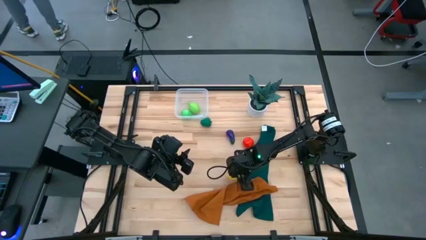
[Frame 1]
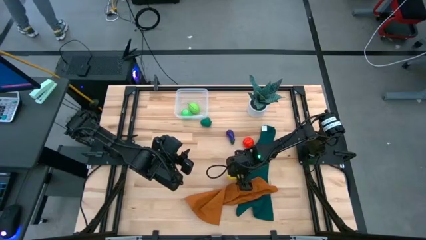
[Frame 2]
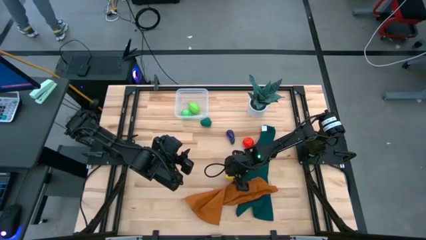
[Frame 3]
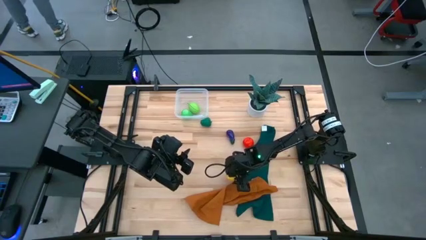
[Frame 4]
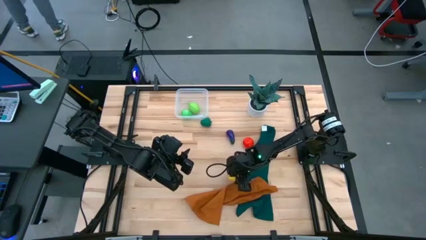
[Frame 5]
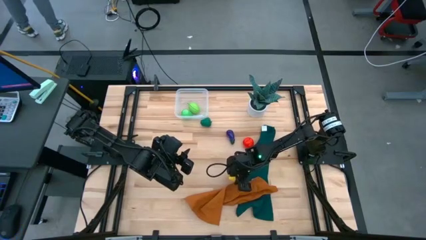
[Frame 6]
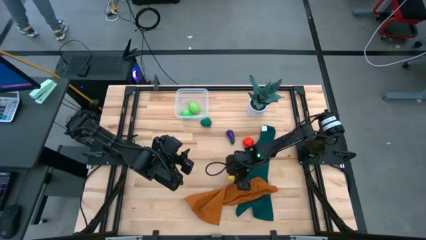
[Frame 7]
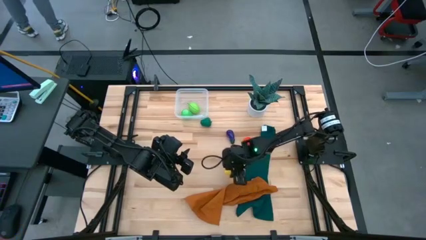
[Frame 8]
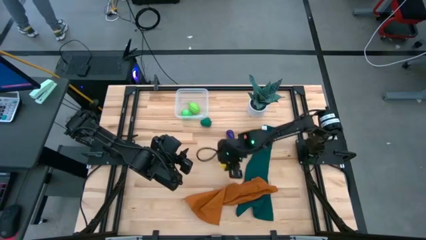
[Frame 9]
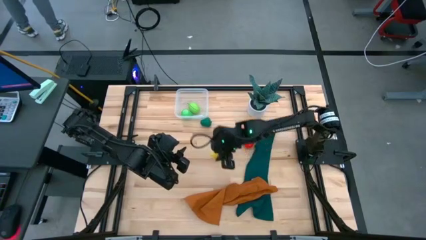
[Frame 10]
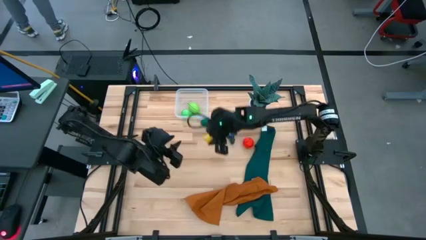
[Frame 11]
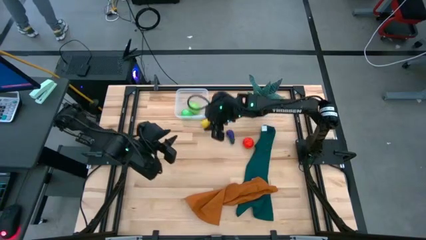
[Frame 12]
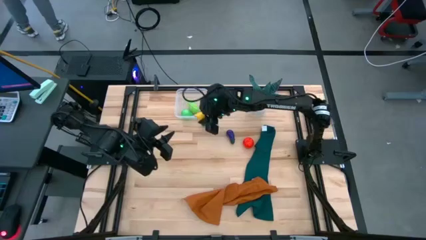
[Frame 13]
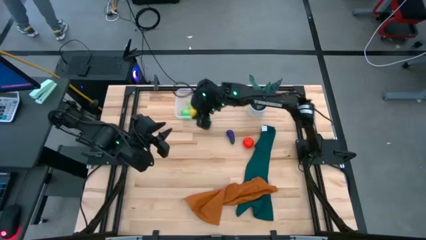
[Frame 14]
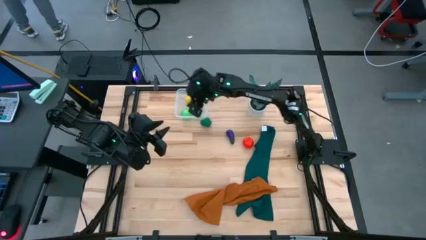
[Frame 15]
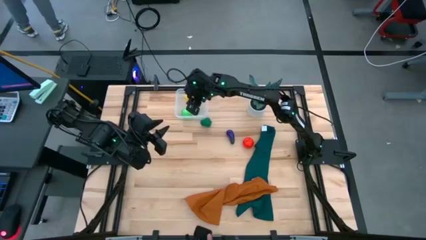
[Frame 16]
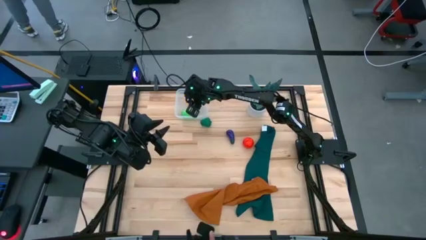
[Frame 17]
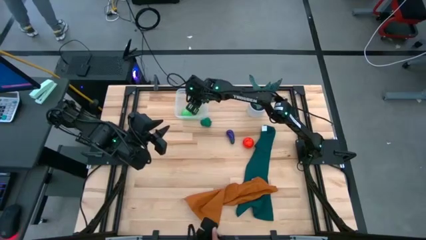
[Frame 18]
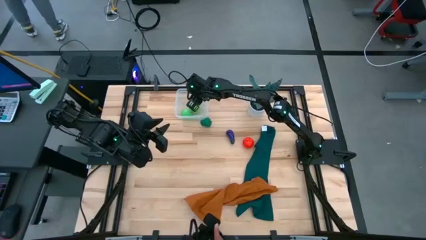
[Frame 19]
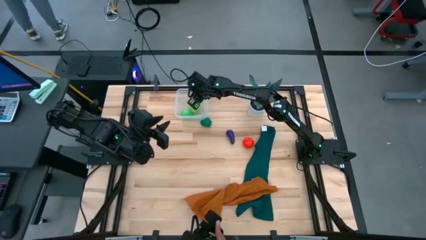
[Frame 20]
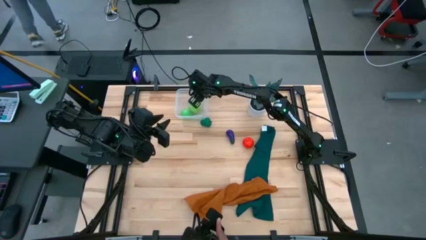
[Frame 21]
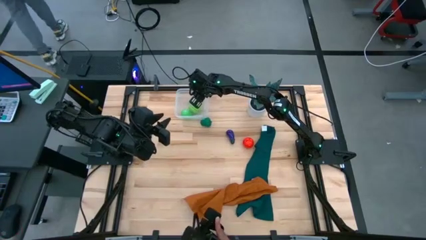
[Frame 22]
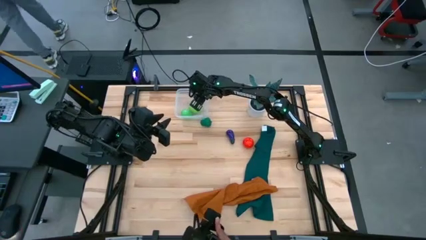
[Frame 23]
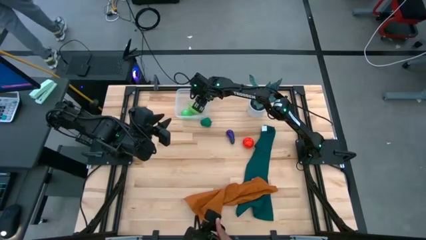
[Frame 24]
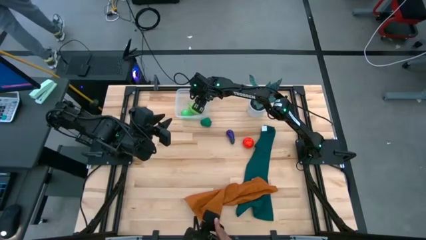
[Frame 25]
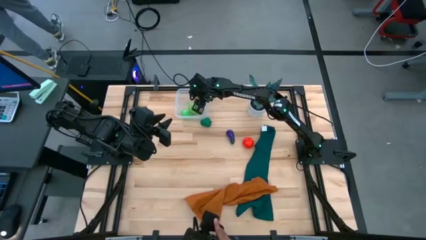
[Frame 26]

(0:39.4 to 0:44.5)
Task: Pick and placing Produce into tupperware
Put the yellow lemon into the transparent bin

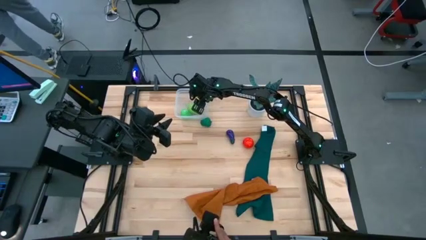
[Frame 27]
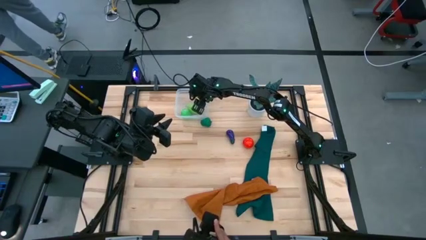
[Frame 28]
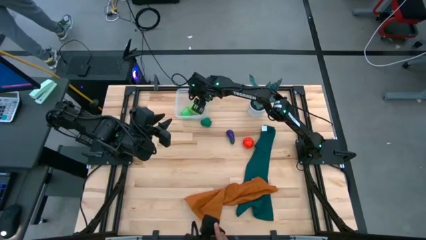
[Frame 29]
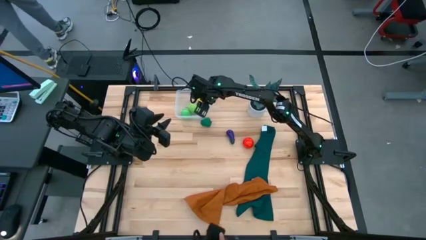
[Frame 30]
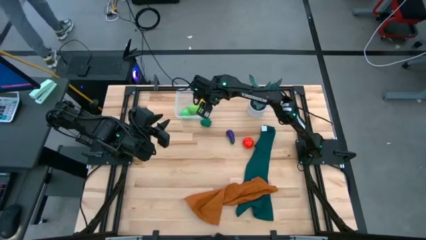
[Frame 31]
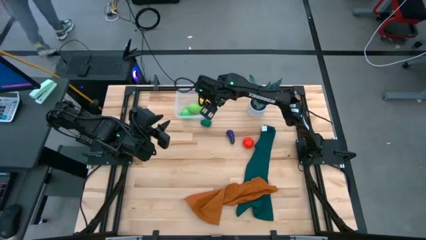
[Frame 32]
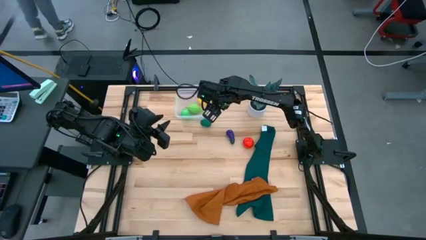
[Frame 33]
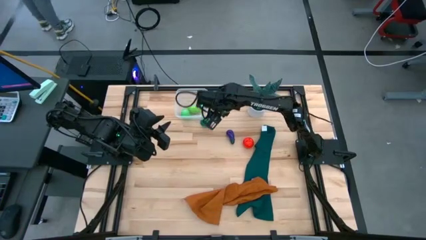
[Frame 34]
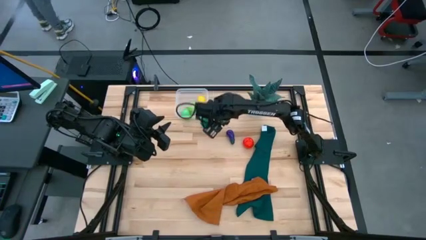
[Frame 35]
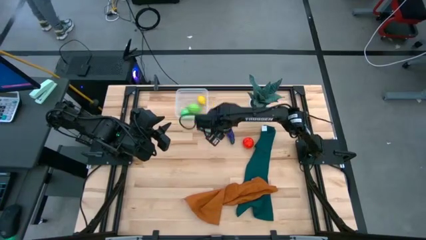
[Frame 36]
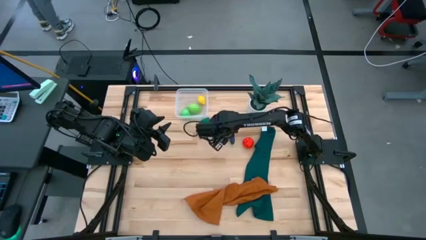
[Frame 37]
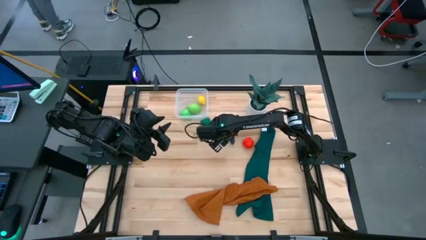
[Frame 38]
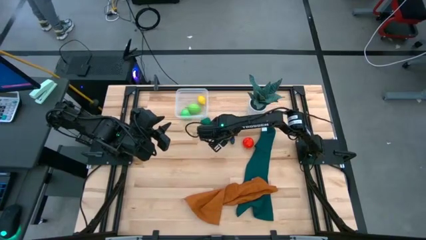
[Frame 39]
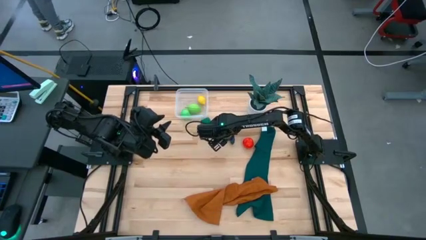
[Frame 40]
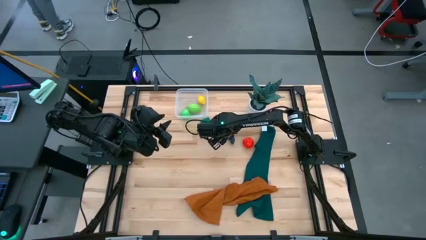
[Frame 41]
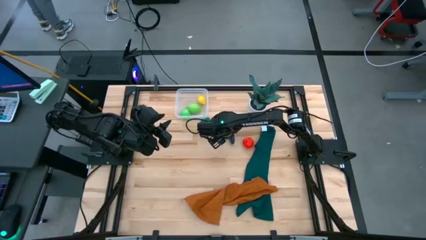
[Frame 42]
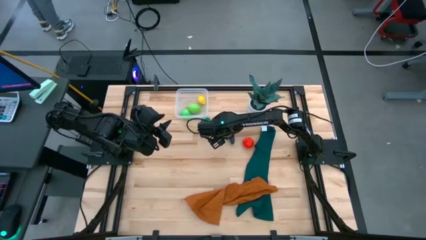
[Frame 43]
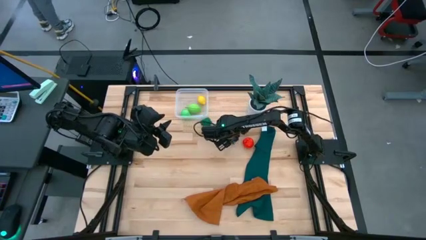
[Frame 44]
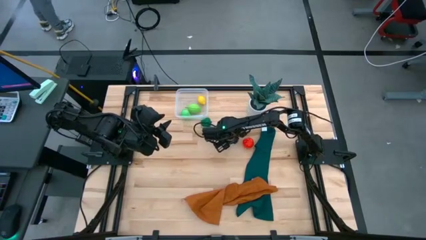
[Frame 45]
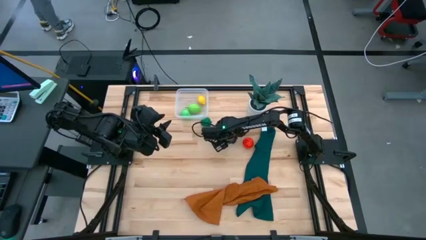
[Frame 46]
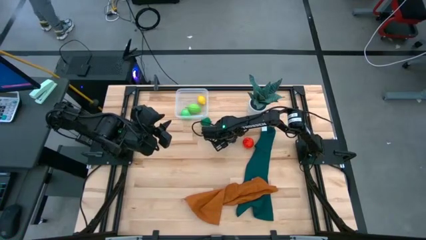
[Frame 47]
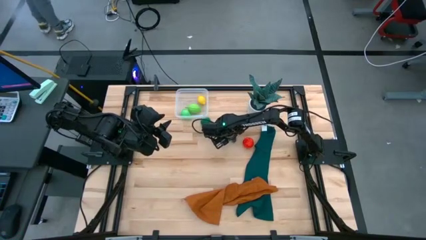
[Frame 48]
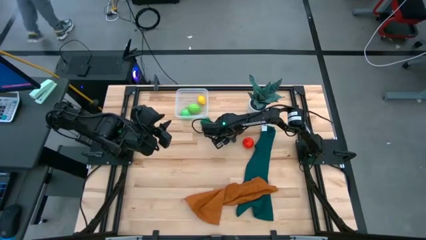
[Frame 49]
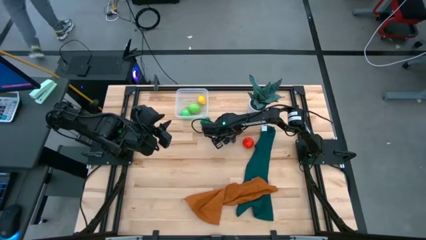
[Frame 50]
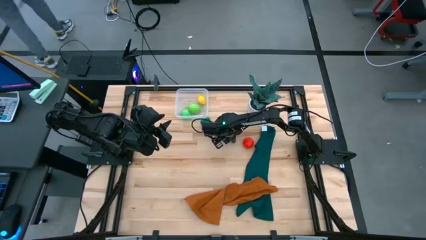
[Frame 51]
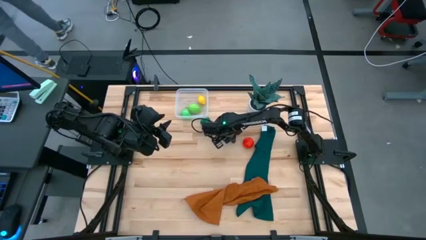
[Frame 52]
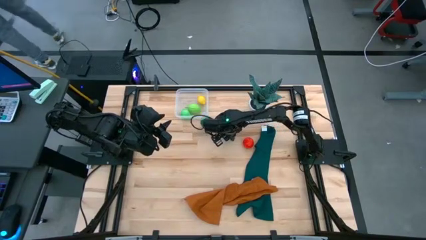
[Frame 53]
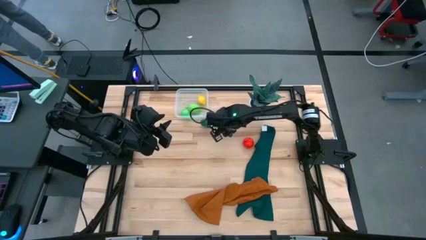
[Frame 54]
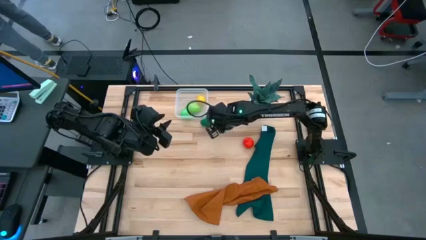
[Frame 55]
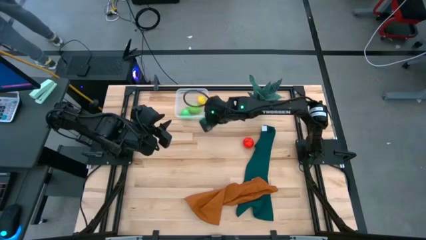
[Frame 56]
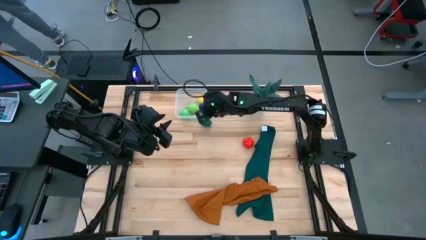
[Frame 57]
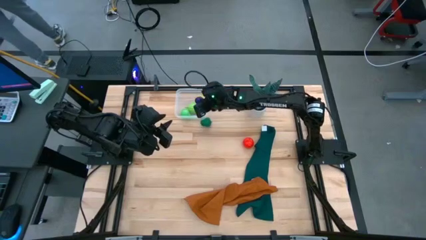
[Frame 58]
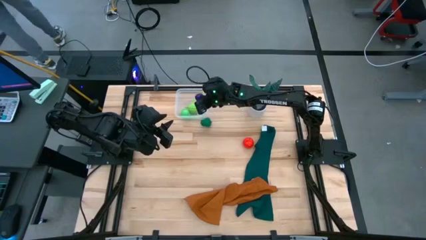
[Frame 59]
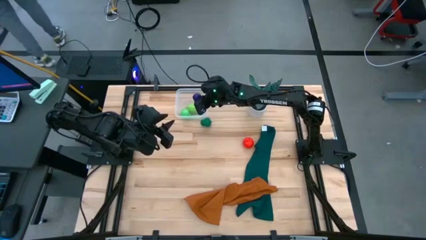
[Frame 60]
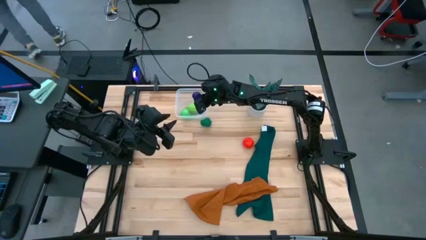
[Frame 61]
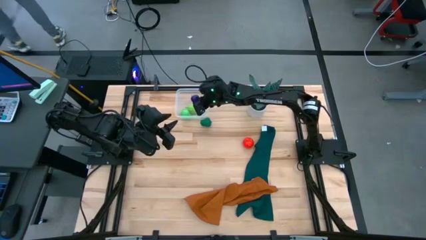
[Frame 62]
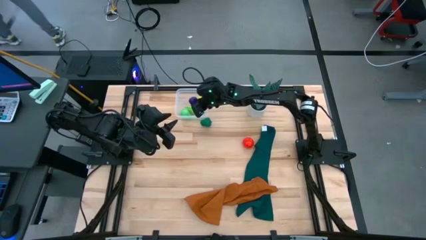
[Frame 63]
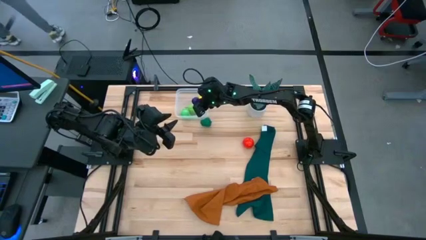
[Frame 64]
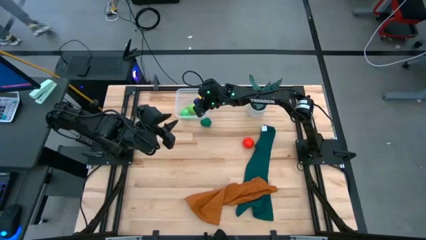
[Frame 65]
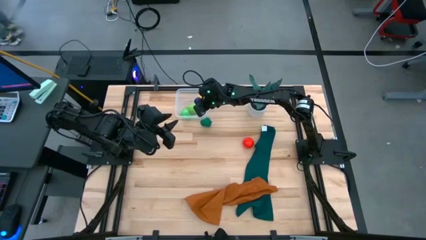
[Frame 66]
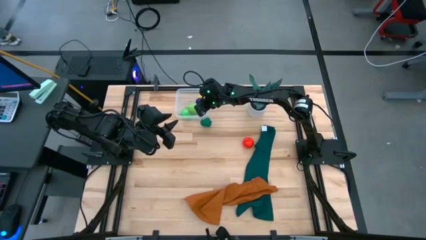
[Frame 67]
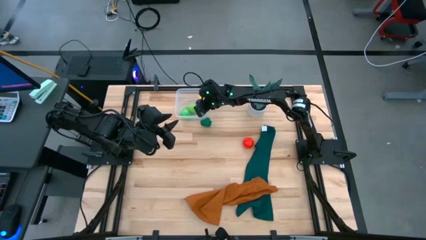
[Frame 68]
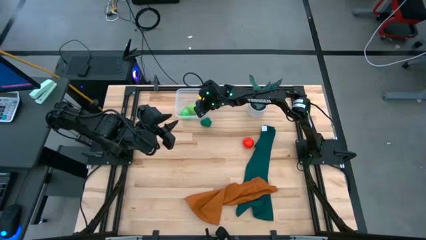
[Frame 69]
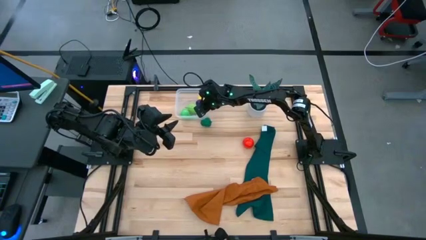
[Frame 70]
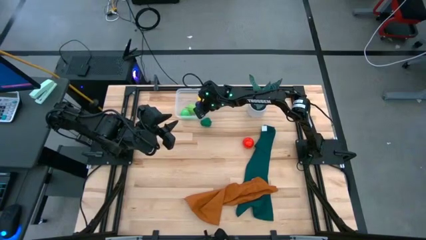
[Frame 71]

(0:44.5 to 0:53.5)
Put the violet eggplant into the transparent bin

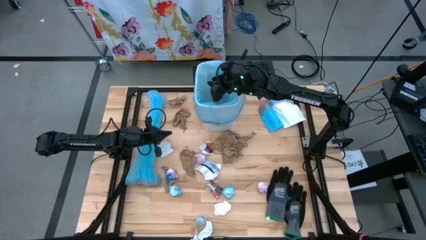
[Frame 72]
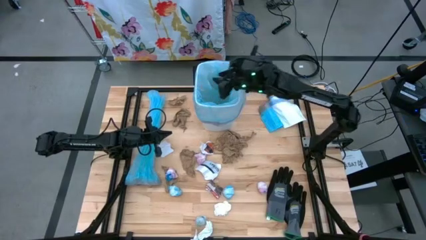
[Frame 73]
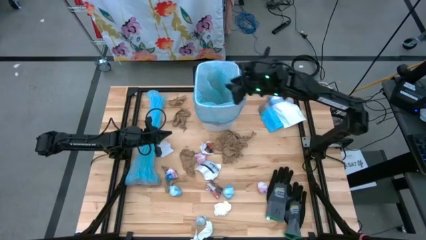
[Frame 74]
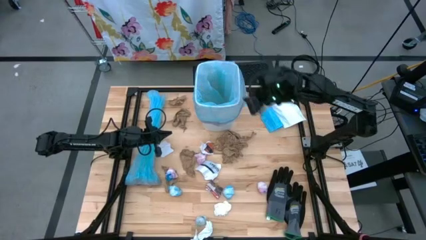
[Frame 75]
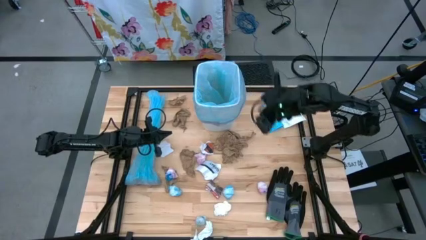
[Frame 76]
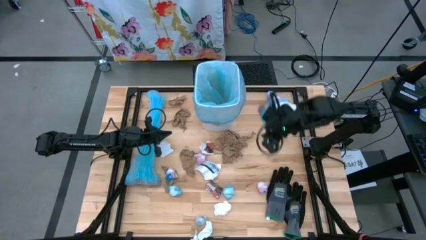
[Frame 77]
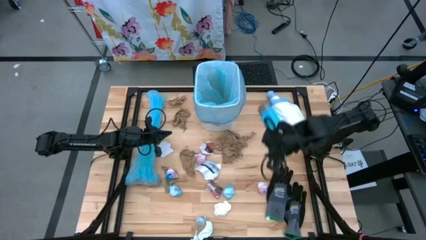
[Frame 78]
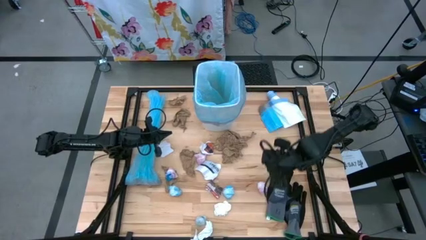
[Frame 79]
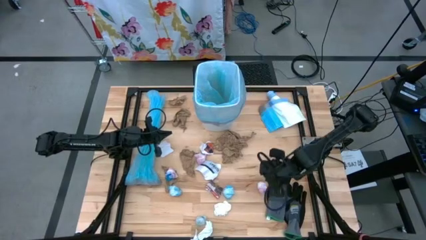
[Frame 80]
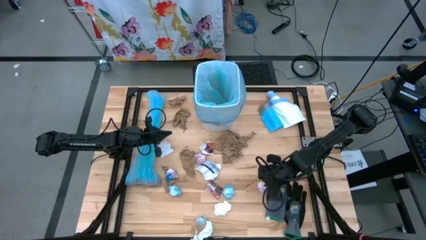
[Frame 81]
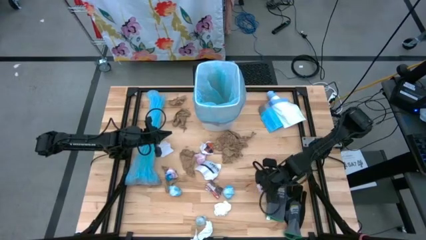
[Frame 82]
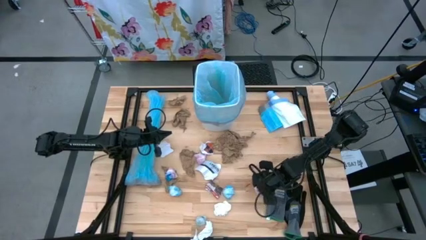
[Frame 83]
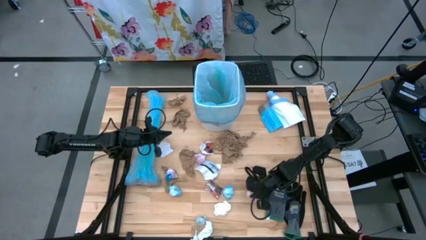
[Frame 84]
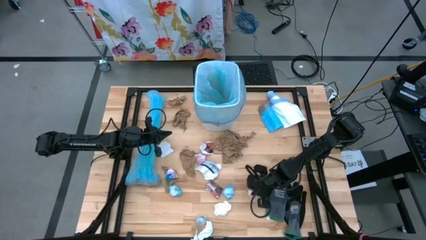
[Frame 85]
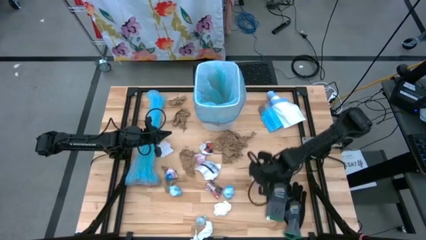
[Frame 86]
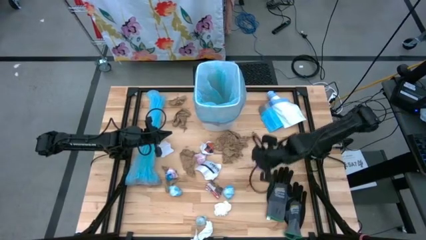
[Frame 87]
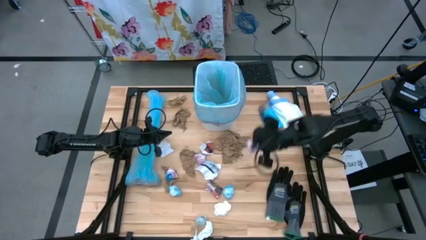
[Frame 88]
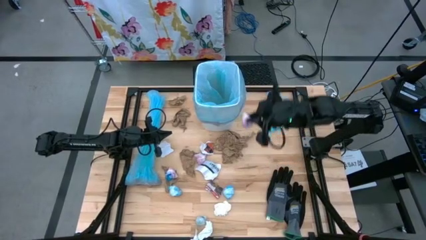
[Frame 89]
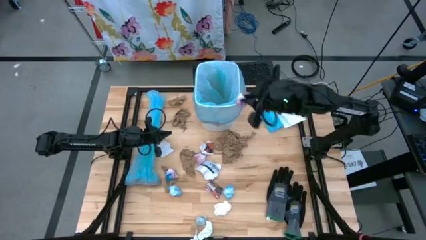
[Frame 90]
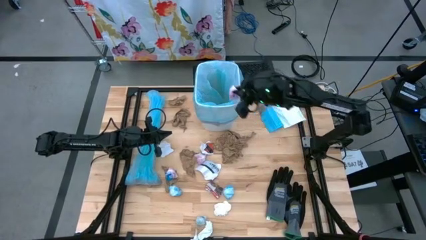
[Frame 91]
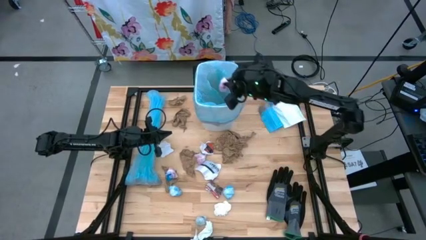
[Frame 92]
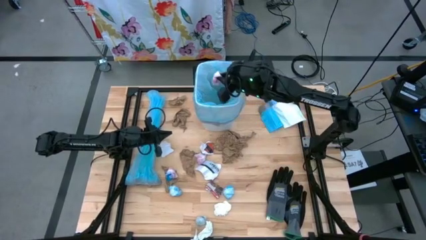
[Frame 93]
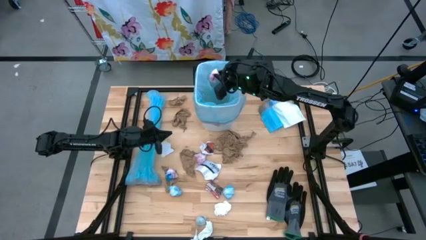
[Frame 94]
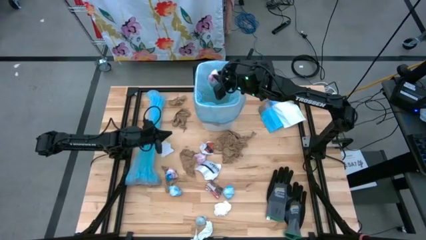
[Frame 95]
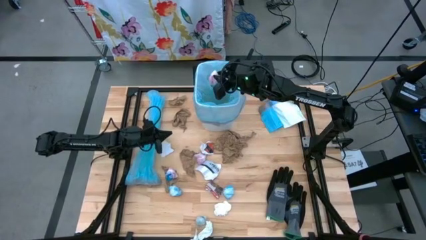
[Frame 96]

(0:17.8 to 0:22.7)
Task: place trash/remove bag and relplace
Put the pink plastic into the blue trash bag inside the white trash bin
